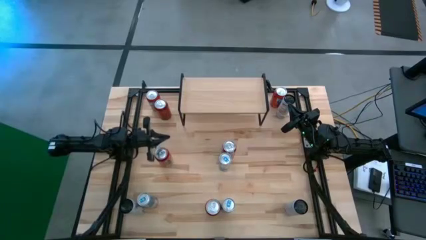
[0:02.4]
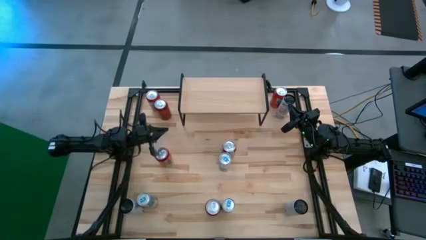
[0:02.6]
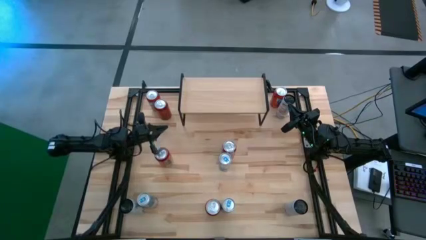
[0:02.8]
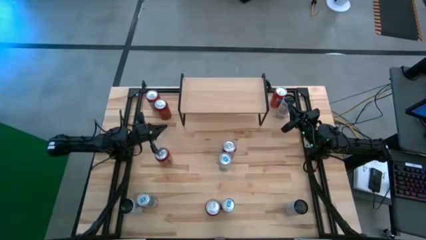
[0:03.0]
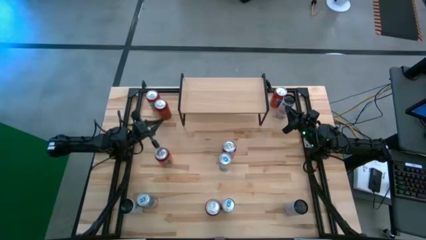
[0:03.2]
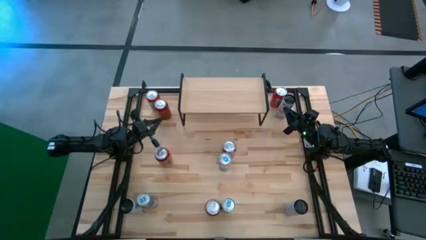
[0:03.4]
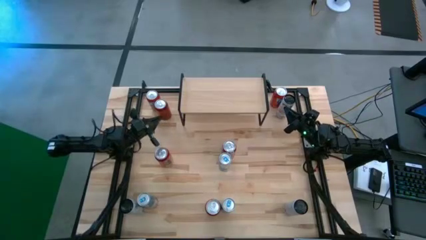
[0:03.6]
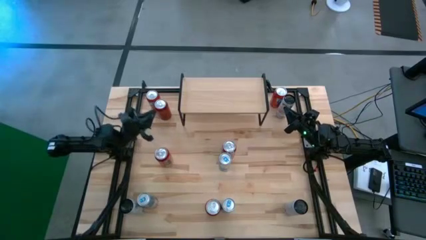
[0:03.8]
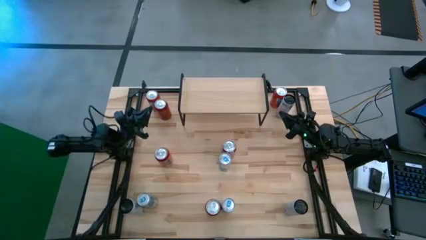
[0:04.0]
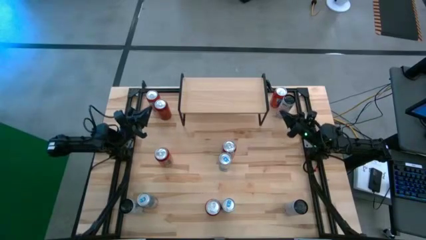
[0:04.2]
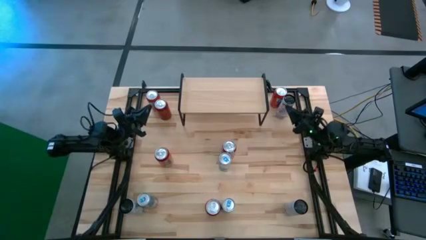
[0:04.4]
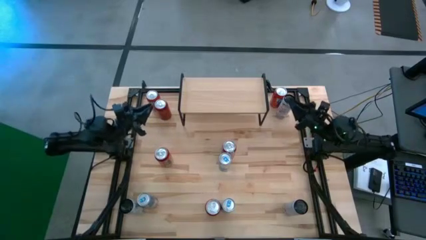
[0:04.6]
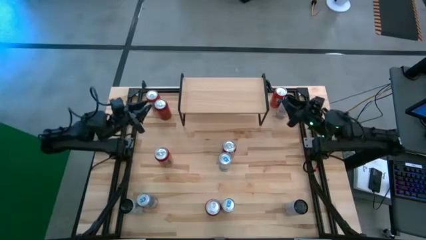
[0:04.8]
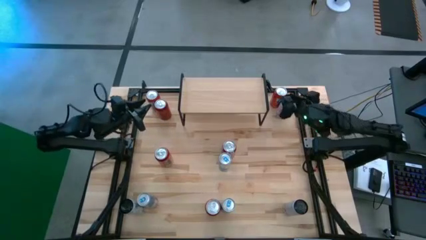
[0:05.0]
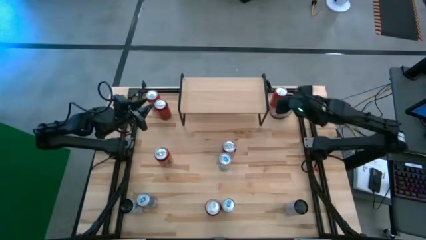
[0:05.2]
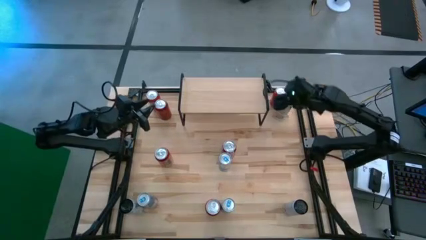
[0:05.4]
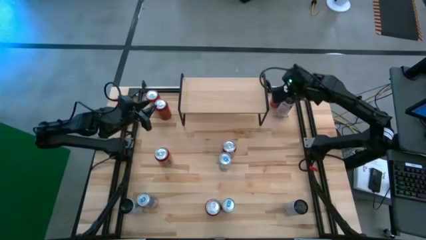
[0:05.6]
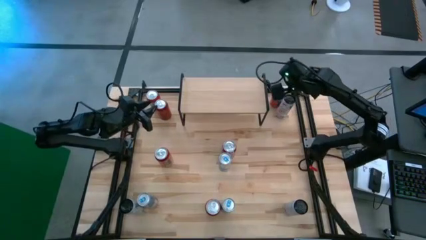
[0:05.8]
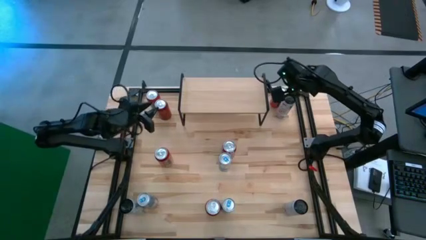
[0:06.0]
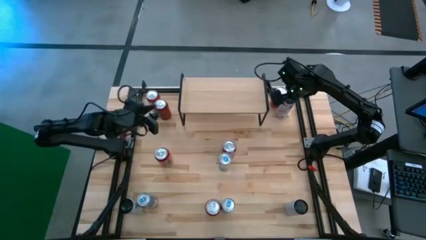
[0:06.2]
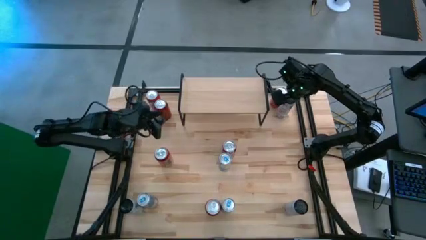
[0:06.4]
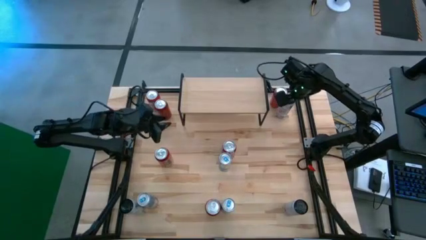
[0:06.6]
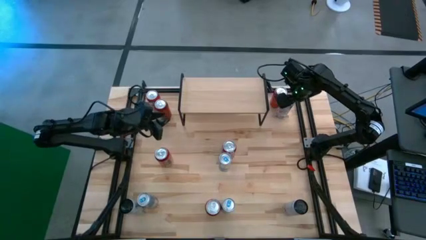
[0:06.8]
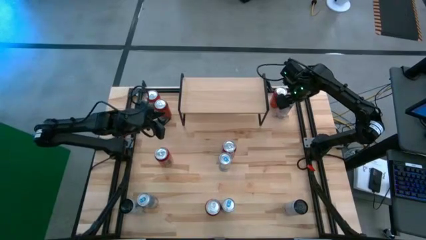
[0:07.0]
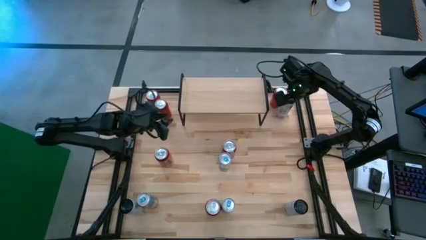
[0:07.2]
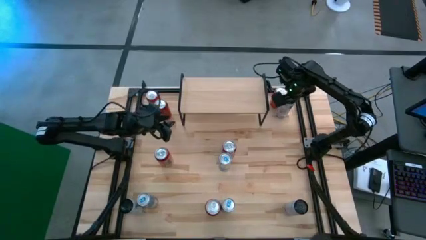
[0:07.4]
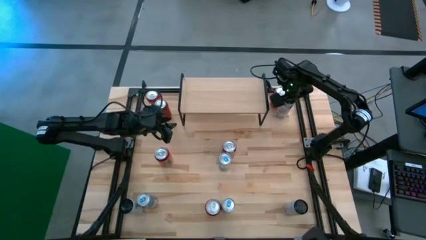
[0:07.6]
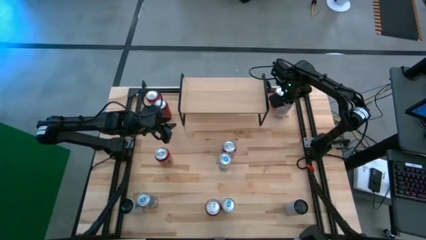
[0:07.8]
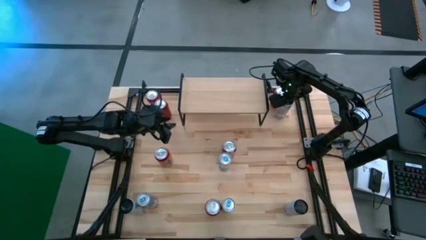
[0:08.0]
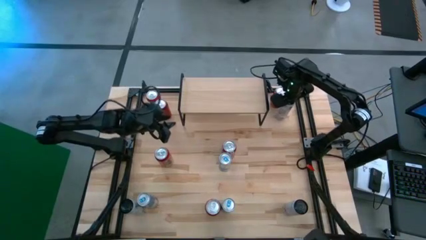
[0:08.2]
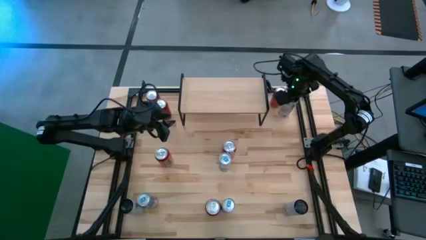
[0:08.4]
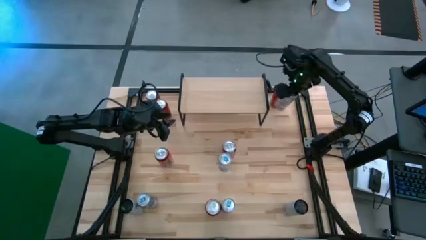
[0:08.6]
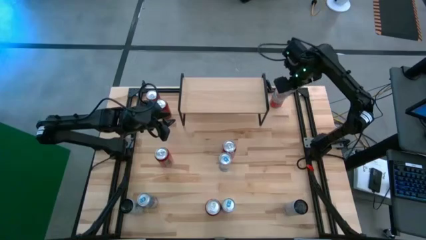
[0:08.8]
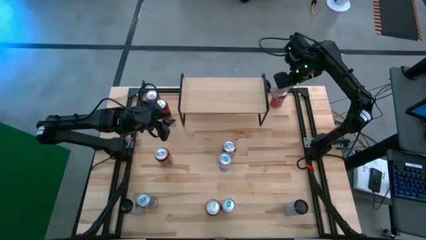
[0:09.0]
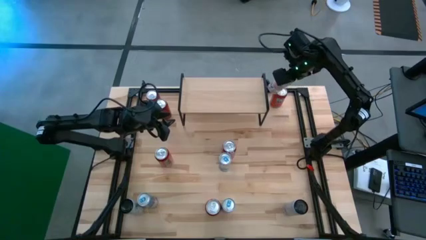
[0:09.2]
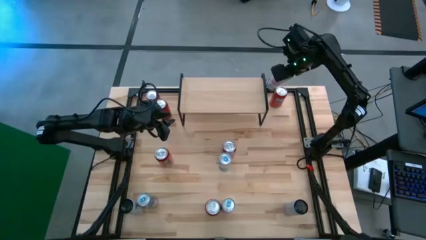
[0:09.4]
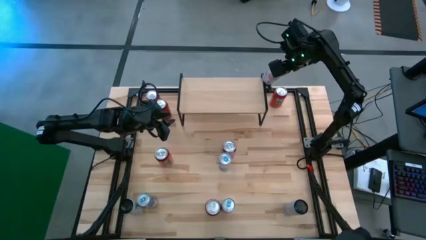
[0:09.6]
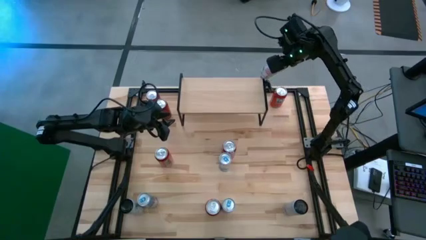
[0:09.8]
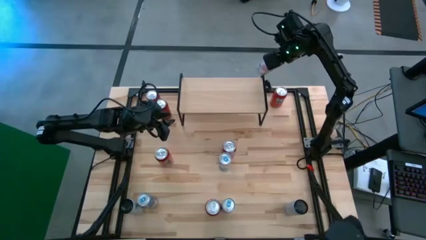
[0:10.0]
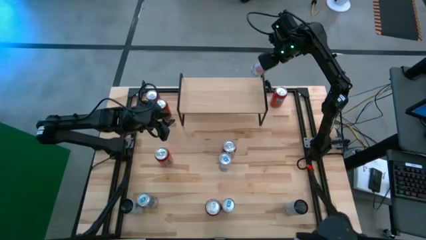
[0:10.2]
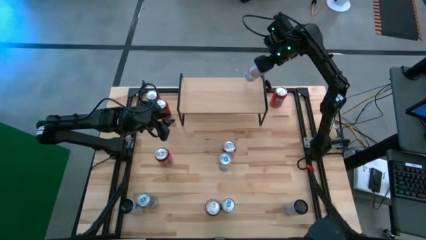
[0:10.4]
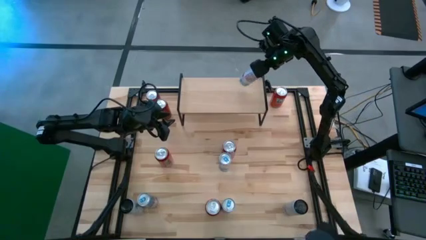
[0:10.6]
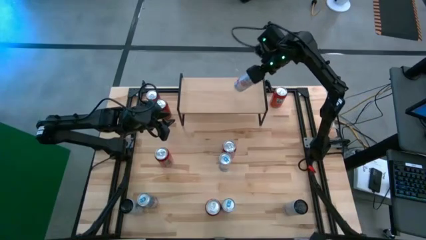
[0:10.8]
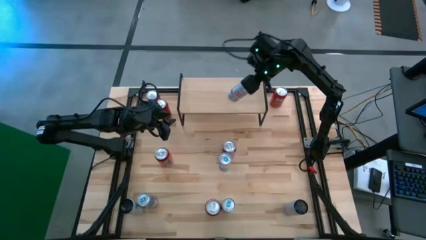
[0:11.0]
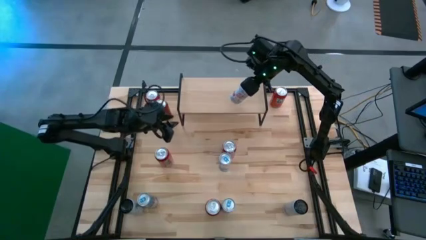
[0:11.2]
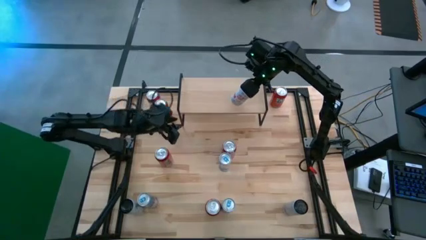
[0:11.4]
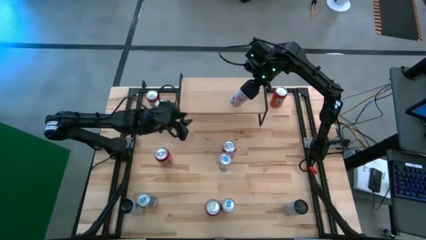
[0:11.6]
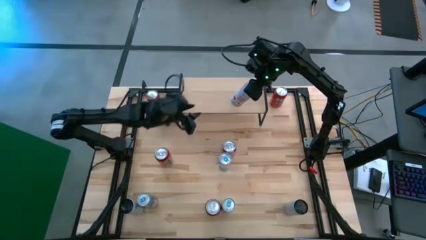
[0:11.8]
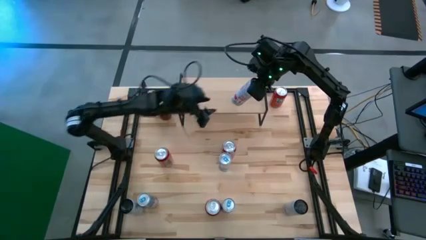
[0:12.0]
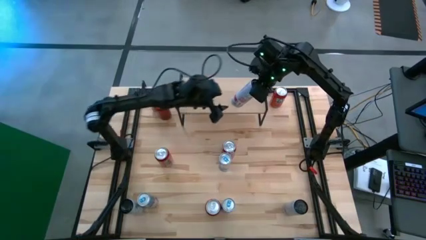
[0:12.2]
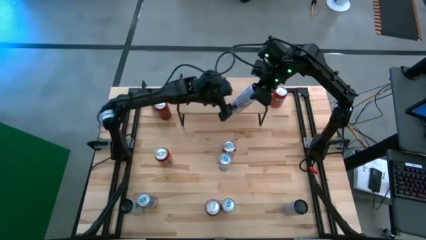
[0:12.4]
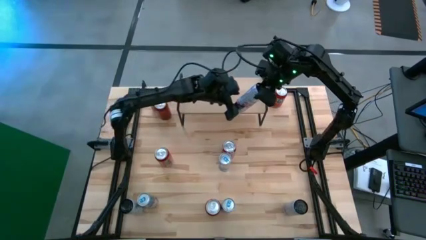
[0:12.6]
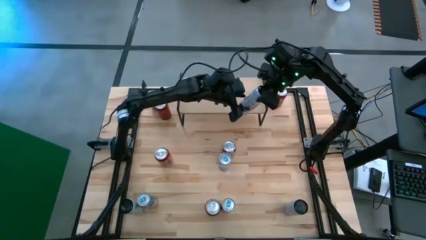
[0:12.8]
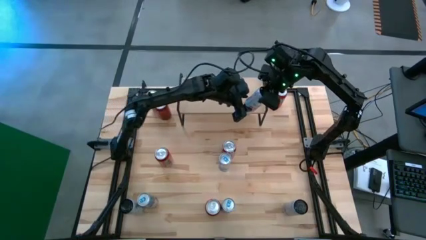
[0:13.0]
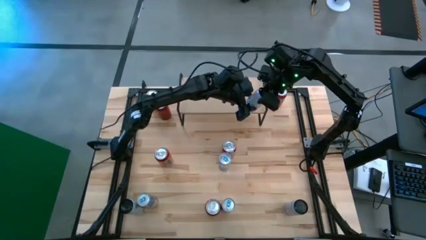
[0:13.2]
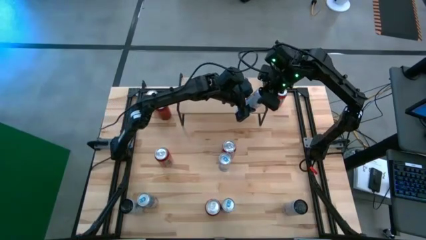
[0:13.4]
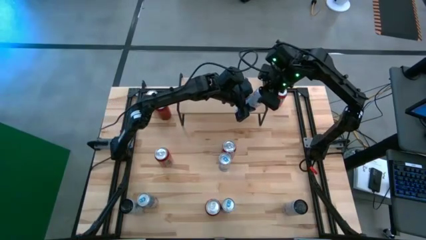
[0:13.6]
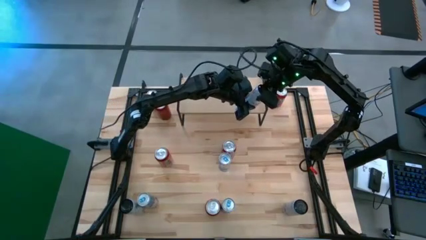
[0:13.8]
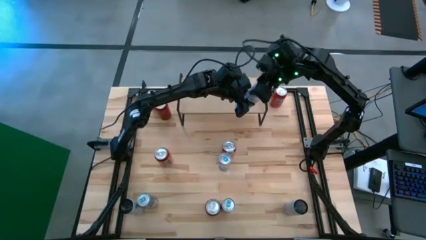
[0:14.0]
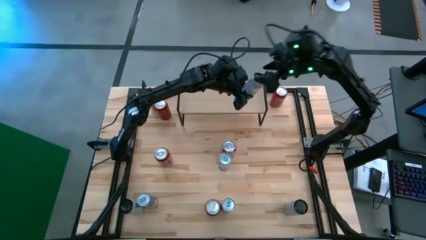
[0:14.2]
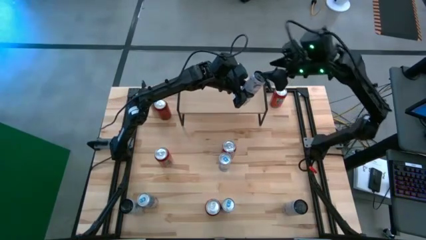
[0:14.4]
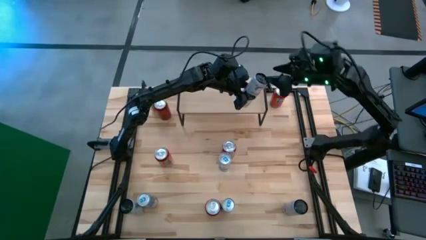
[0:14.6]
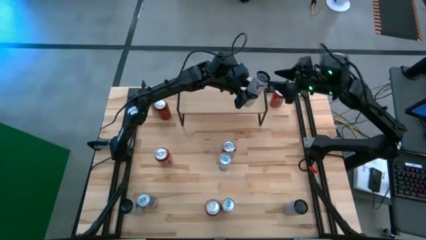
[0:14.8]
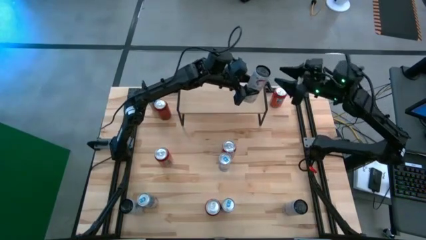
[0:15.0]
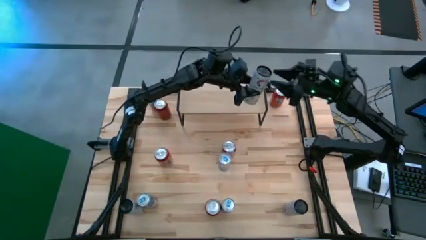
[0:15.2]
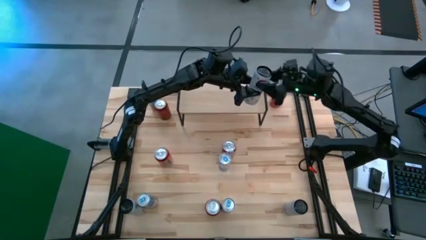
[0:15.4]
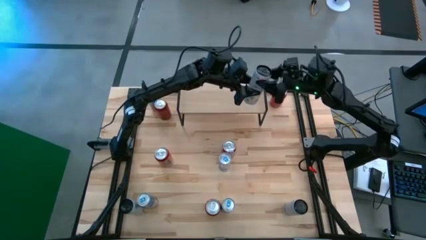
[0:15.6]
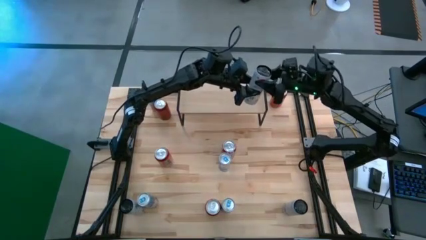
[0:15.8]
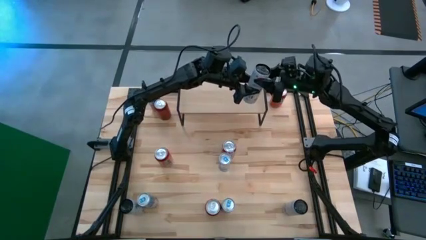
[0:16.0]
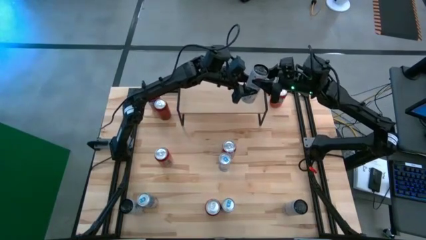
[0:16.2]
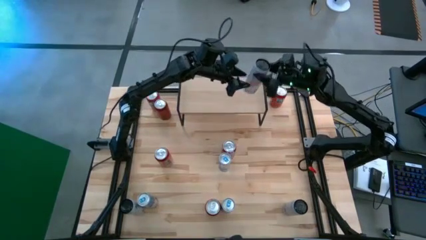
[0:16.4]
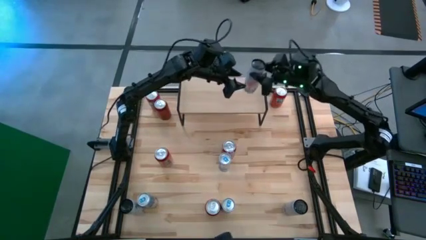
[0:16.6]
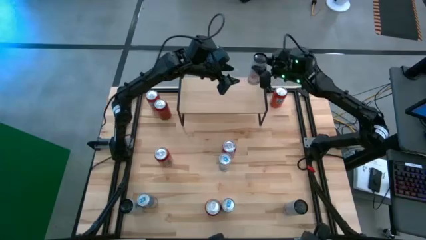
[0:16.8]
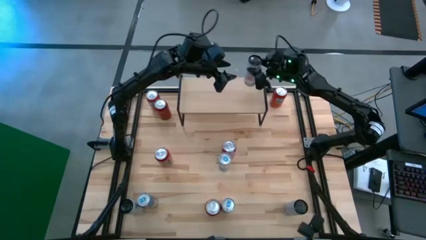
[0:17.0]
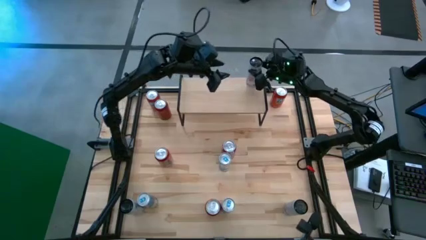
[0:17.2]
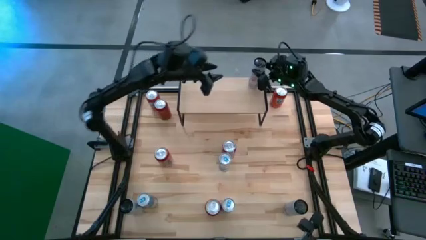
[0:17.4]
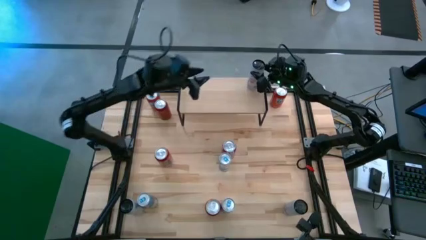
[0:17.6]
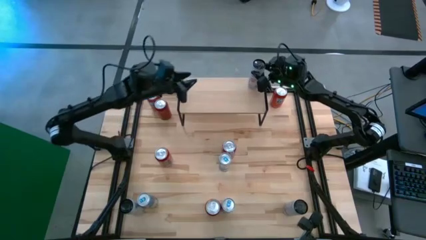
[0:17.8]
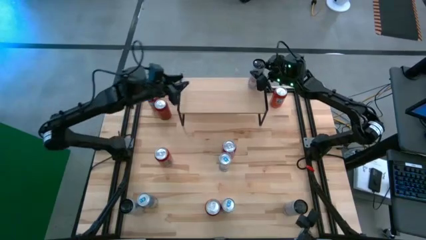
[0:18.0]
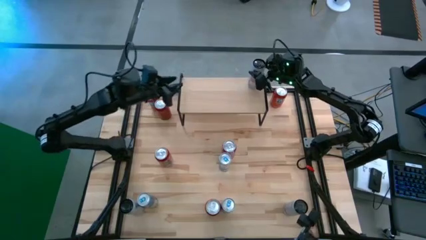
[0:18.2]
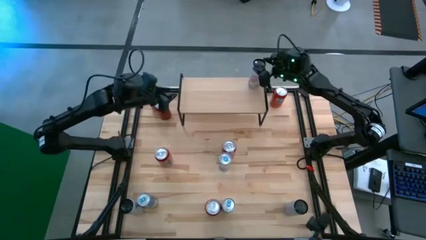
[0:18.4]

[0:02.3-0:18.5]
Task: Place canned beverage on shelf
Put the top white pink soda can on the shelf
